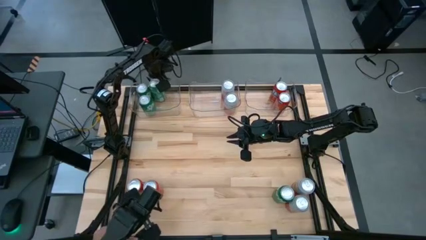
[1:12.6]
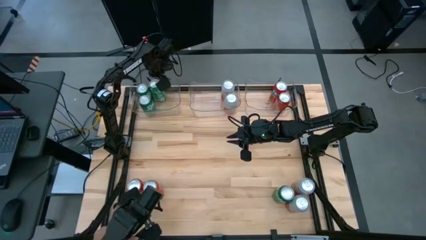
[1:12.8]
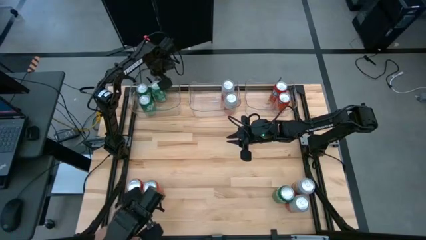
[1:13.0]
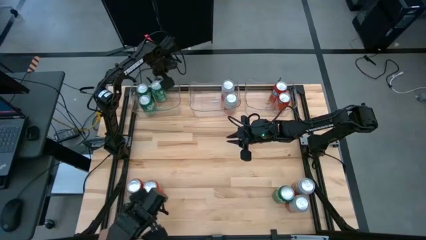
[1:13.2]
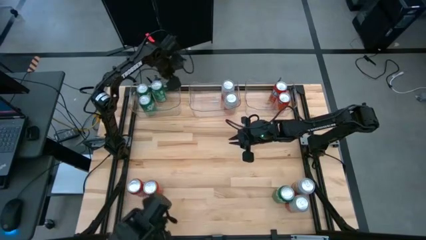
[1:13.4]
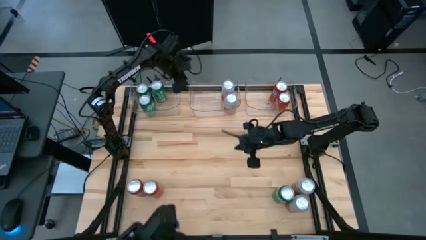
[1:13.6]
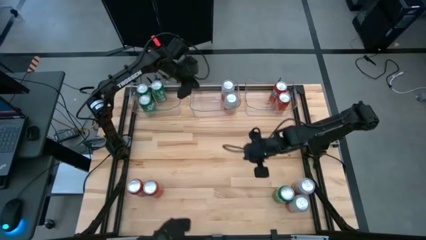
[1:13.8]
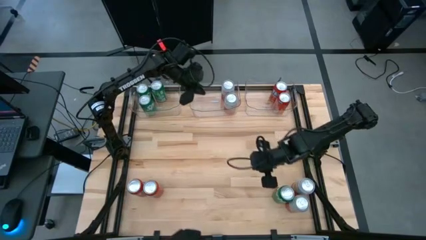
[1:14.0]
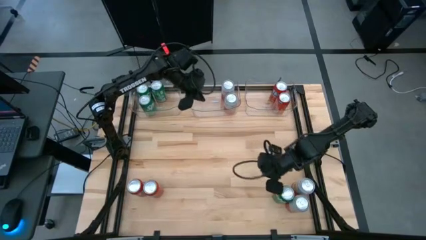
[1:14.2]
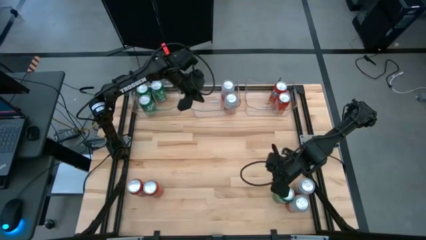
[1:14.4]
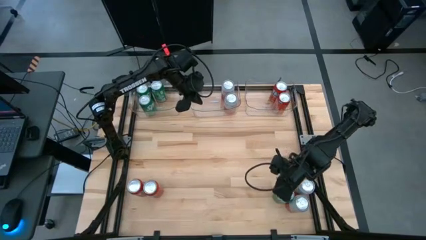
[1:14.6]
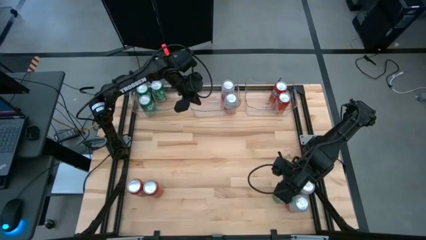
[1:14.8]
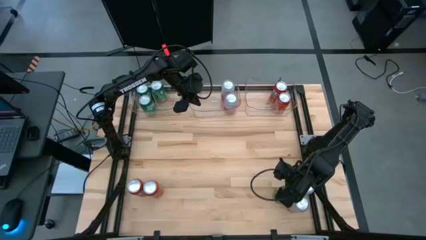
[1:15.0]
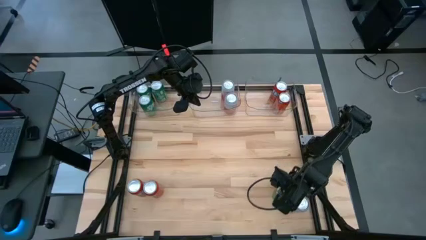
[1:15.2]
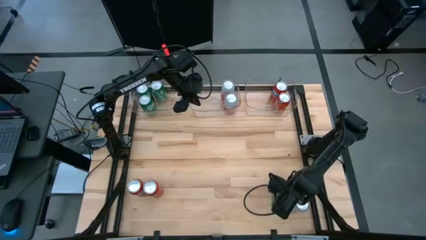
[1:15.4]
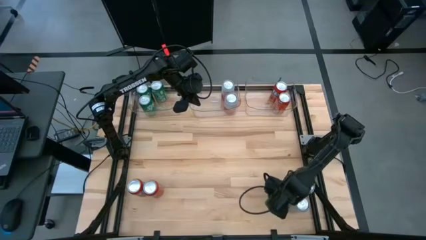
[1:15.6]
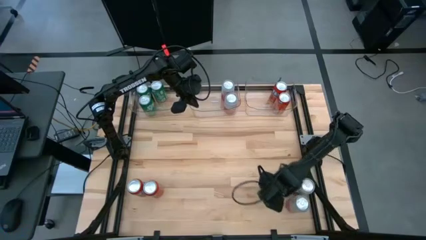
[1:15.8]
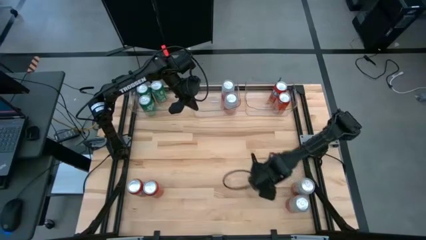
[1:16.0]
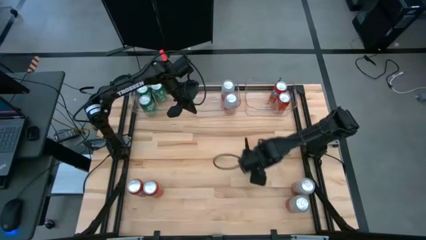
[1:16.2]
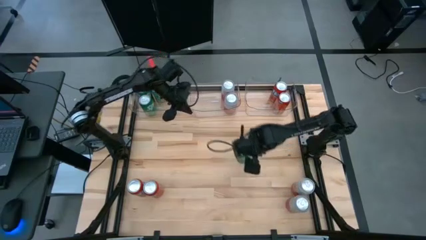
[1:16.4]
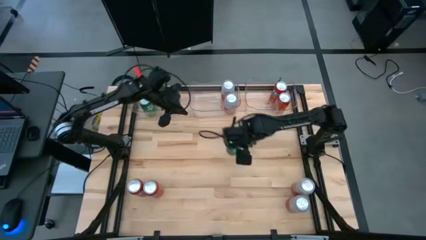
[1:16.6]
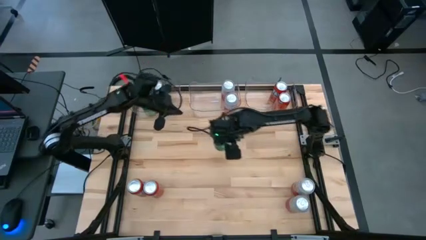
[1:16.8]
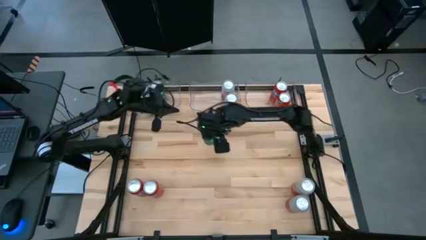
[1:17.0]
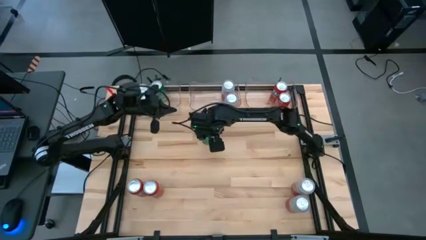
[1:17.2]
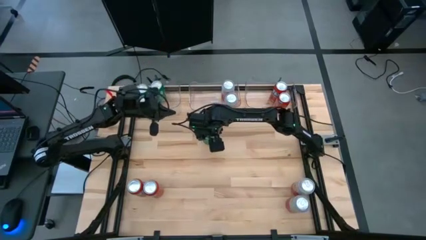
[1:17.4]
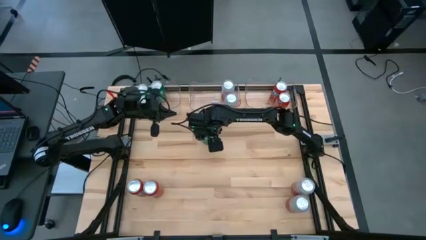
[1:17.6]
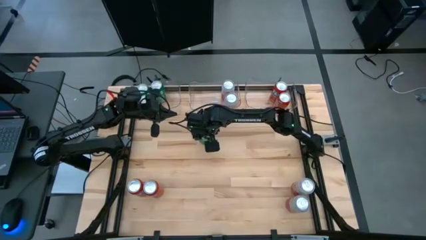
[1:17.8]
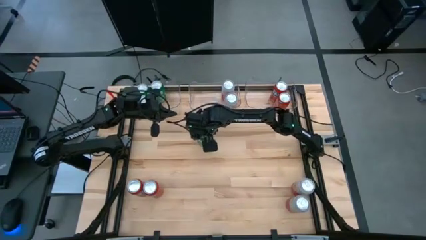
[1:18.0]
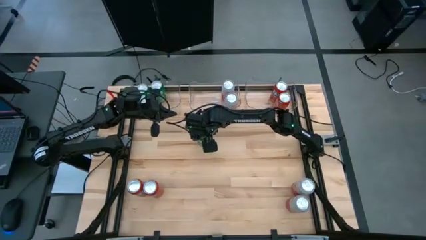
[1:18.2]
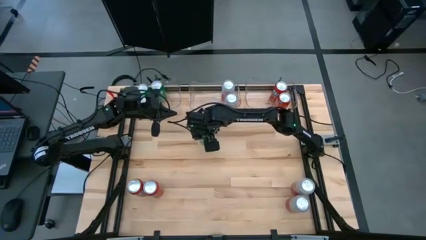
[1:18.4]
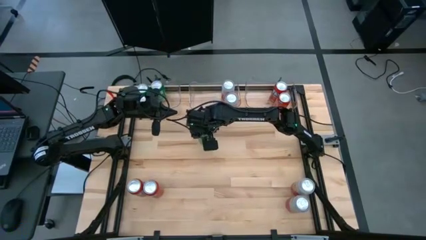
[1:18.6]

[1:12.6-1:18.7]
Task: Sort soda cans
Put the green soda can into the left transparent bin

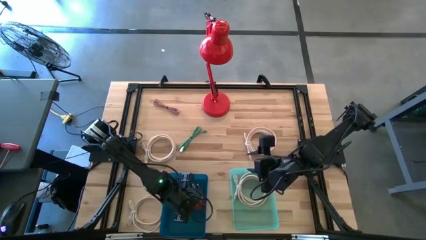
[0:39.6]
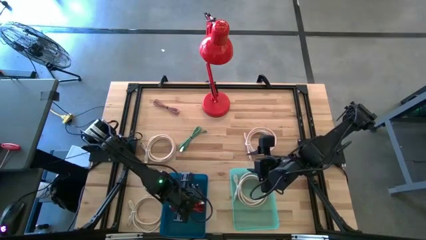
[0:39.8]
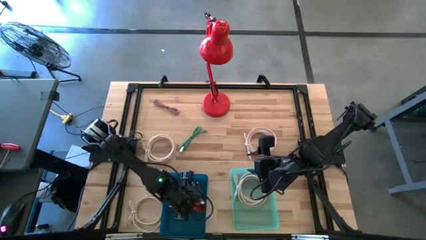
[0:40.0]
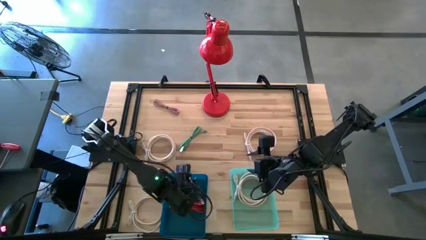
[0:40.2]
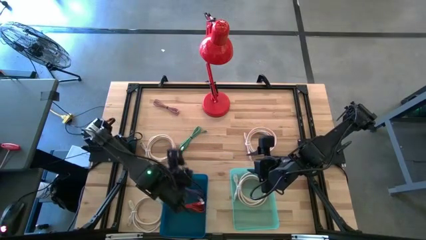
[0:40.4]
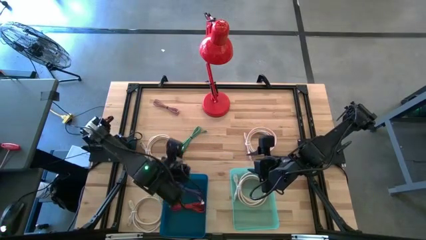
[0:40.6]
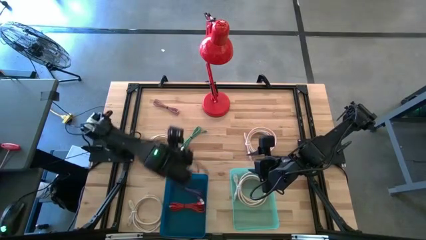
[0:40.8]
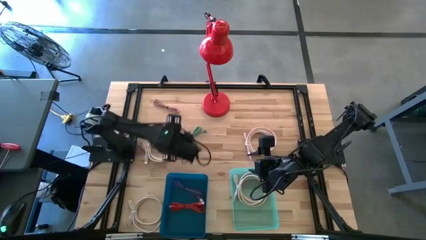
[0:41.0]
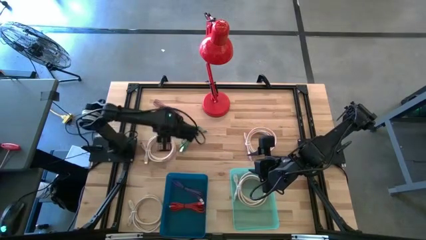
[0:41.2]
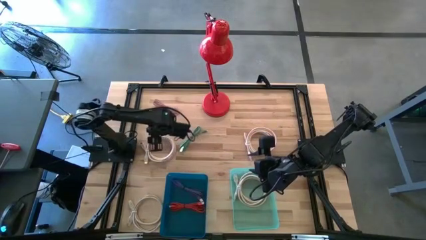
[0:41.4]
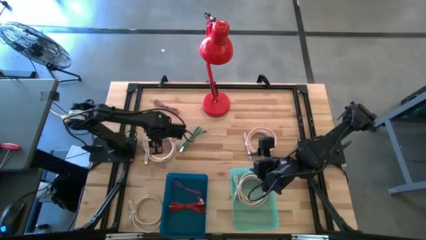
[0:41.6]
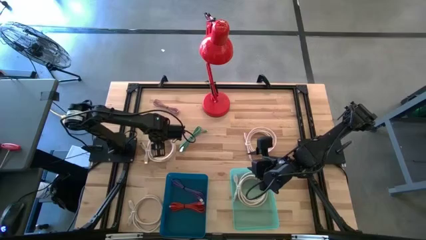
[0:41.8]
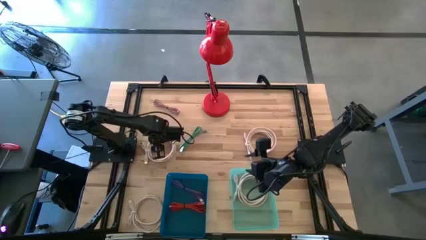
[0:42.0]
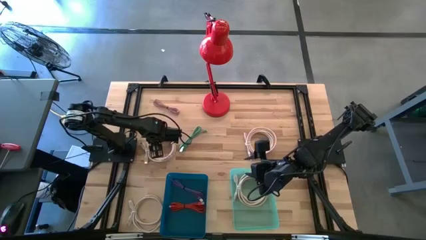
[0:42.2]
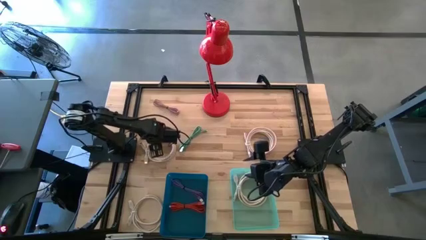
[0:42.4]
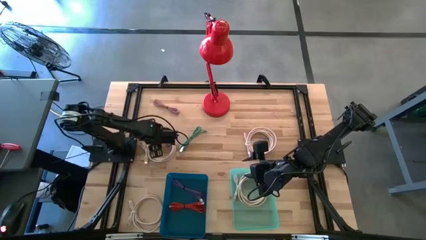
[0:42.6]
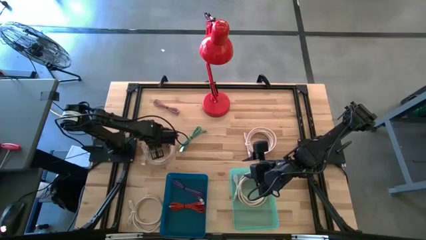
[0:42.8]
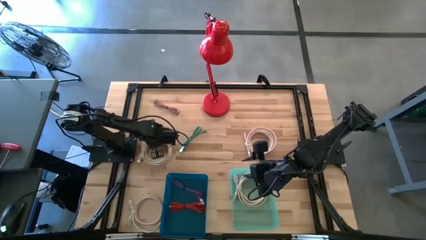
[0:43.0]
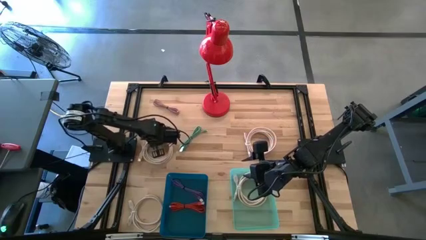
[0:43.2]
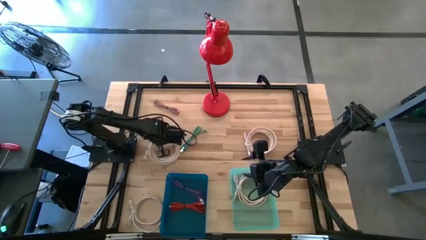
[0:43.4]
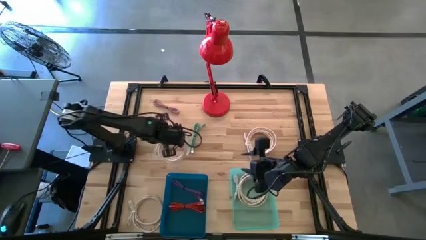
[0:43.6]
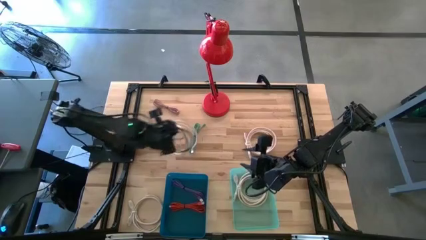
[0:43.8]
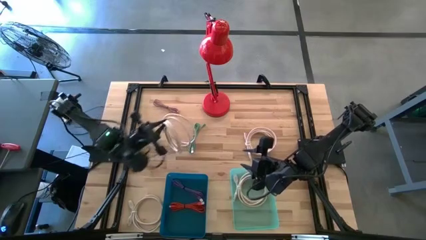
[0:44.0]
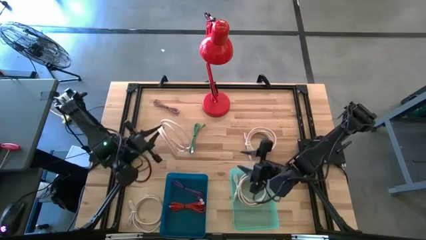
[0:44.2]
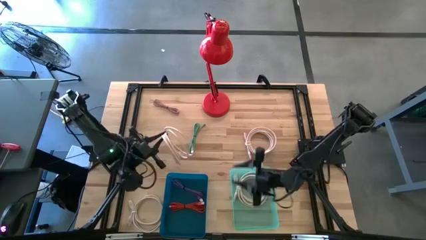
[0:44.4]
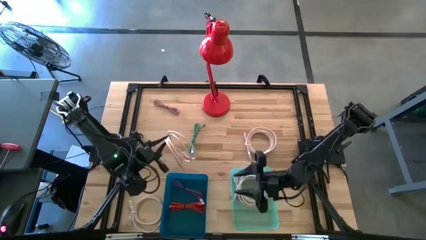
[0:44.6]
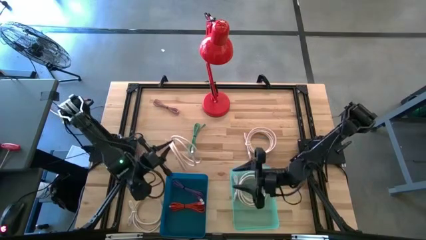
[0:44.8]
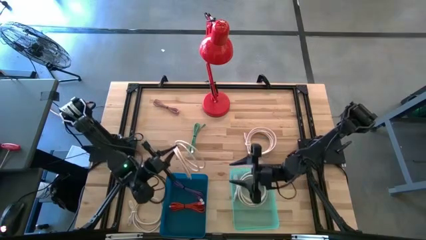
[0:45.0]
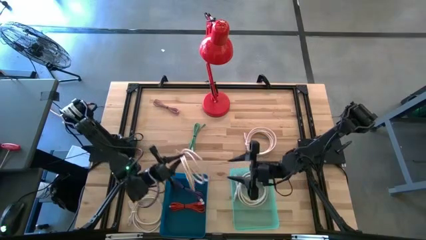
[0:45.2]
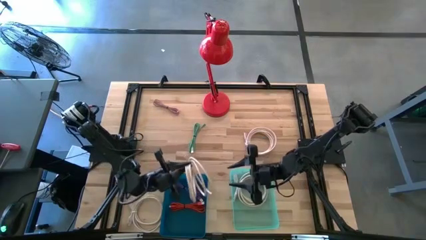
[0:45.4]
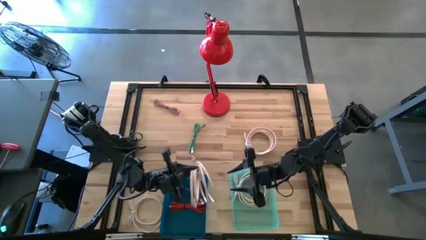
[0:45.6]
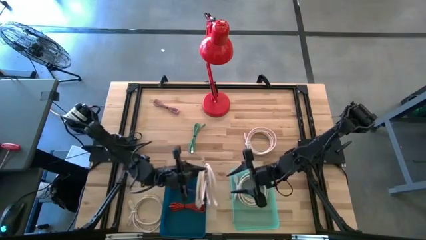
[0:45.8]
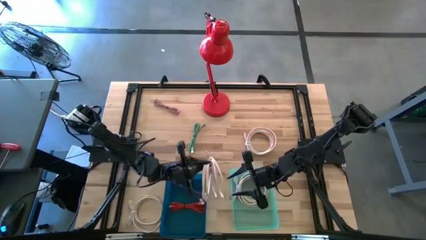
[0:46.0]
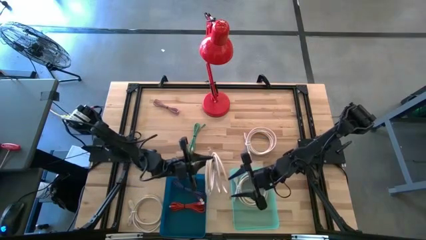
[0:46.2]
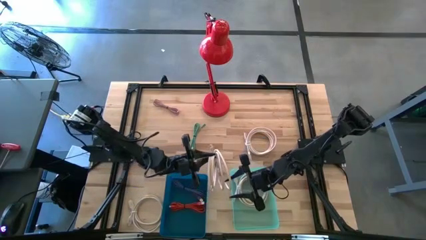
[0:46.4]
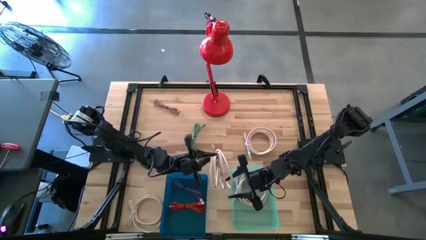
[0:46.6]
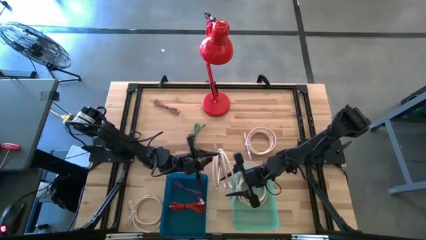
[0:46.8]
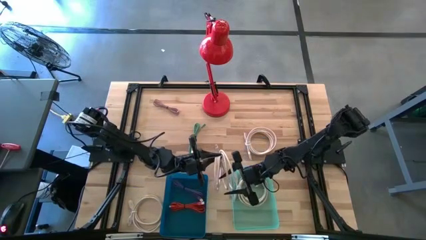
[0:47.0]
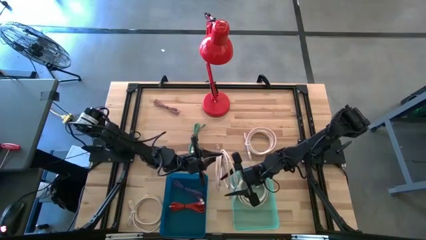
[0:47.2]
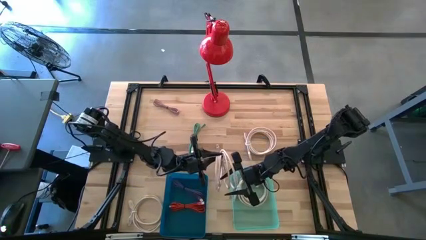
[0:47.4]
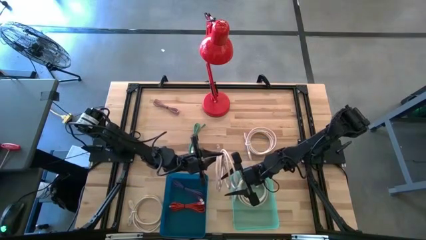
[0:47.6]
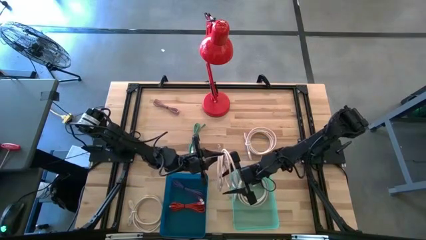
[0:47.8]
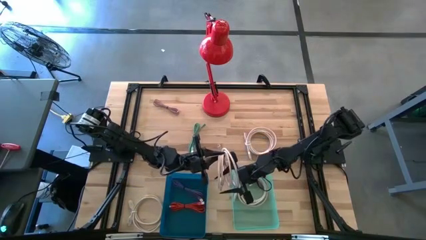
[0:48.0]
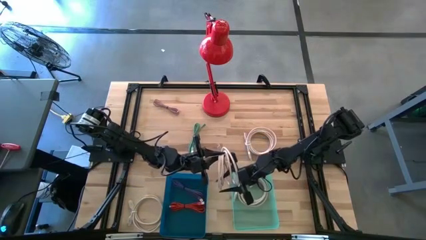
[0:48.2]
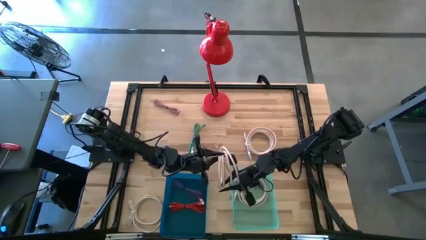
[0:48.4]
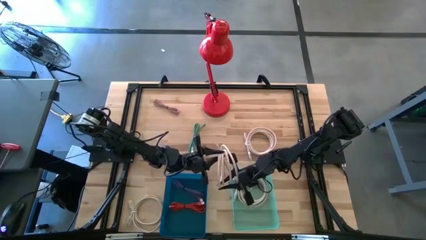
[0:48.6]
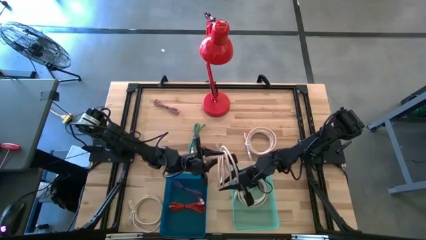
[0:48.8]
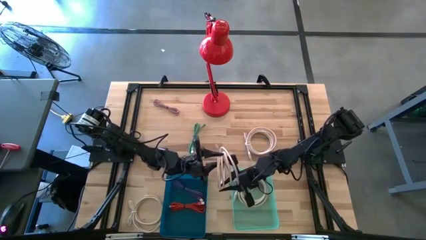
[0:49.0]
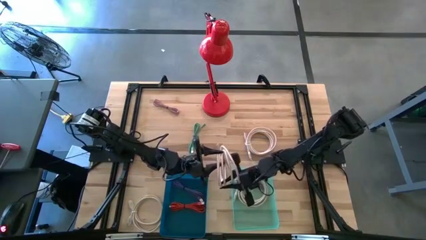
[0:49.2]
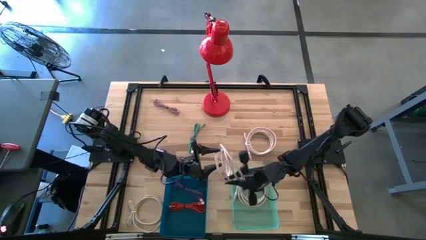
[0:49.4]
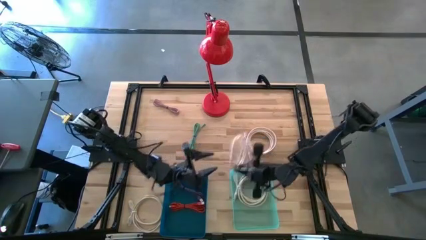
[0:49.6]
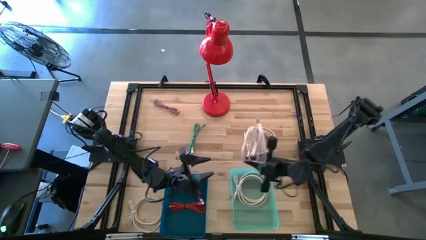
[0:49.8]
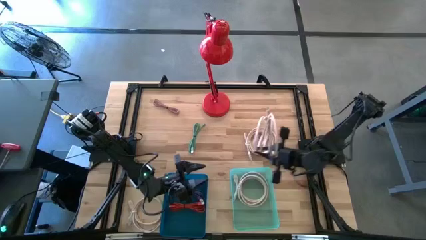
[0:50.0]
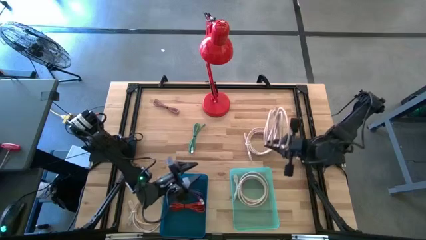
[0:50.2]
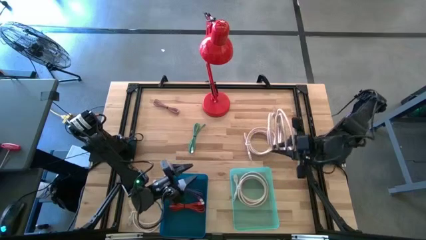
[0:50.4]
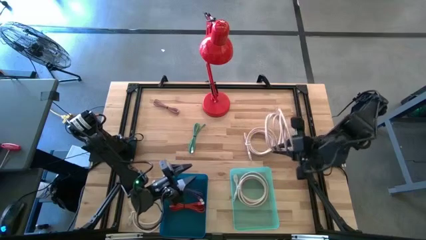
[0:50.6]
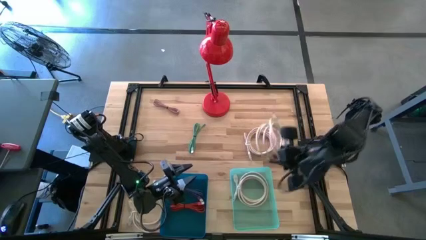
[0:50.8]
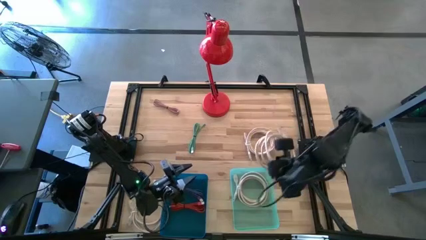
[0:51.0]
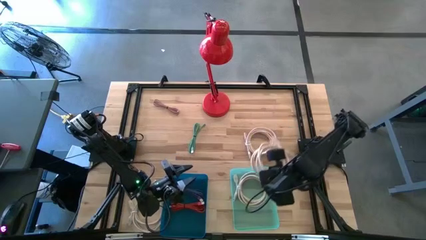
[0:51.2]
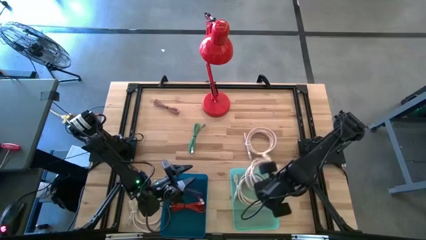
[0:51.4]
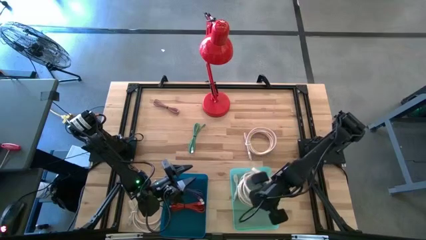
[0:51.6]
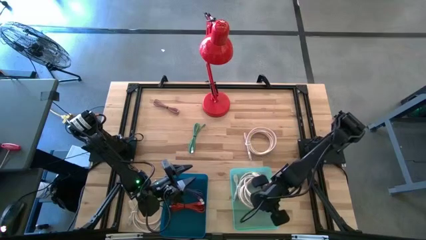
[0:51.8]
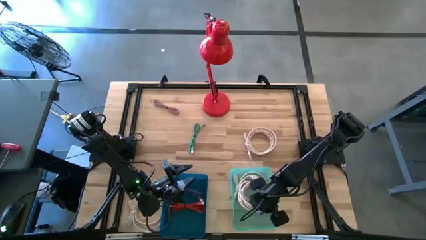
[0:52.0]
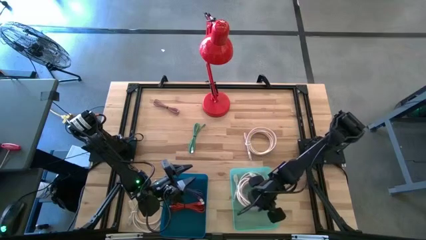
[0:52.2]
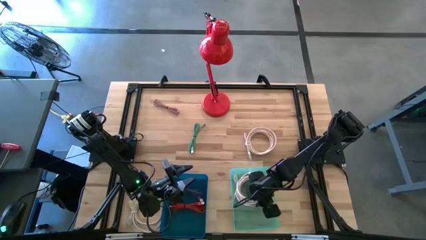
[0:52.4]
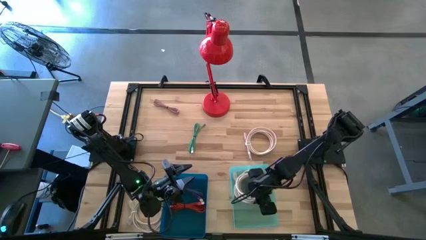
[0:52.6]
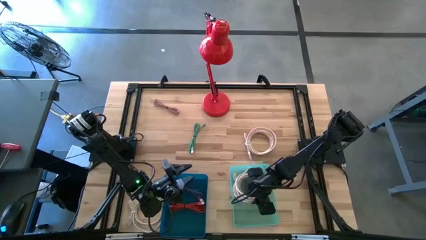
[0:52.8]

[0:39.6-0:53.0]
Task: Pick & Place USB Port
Put the white USB cable into the green bin
